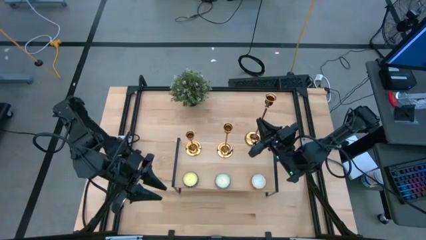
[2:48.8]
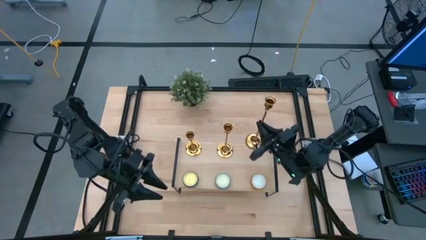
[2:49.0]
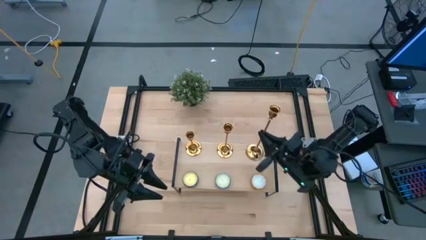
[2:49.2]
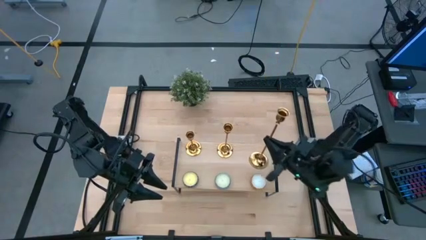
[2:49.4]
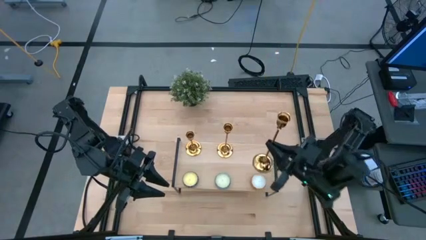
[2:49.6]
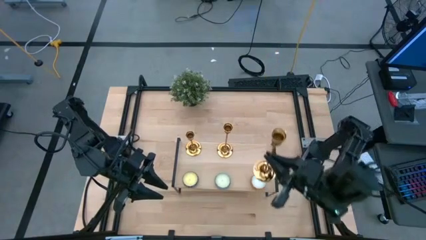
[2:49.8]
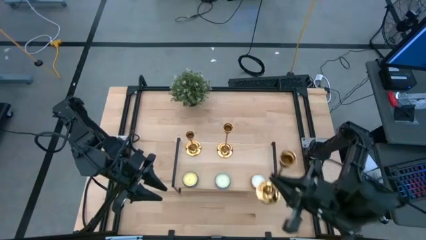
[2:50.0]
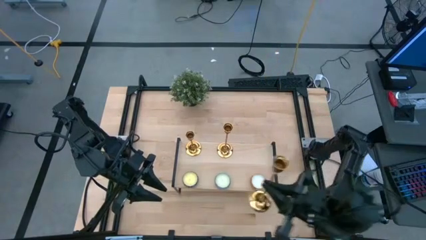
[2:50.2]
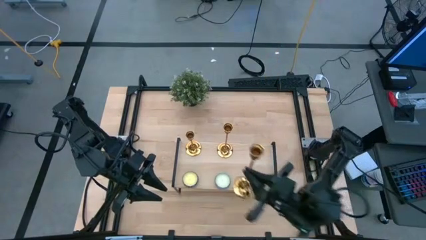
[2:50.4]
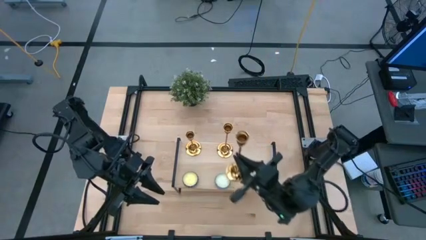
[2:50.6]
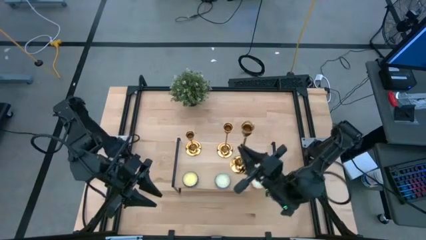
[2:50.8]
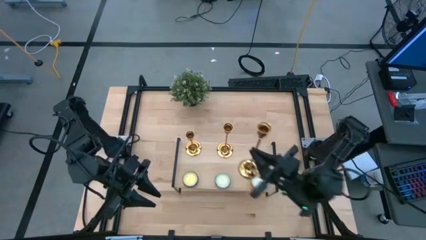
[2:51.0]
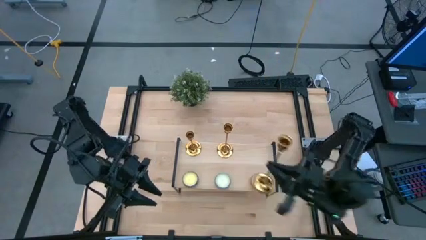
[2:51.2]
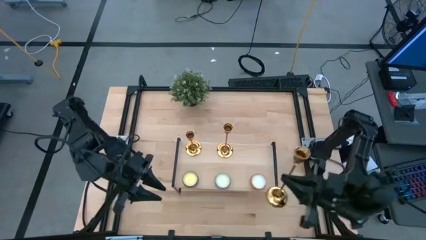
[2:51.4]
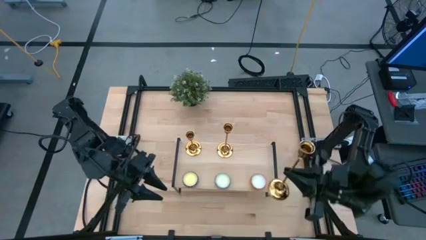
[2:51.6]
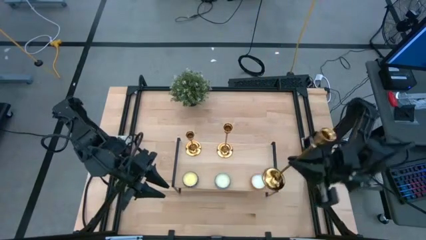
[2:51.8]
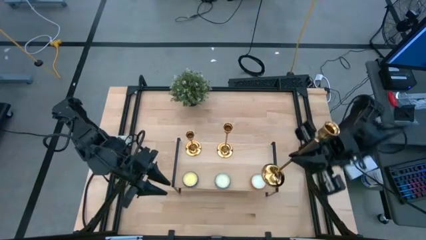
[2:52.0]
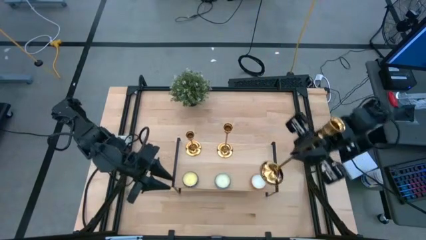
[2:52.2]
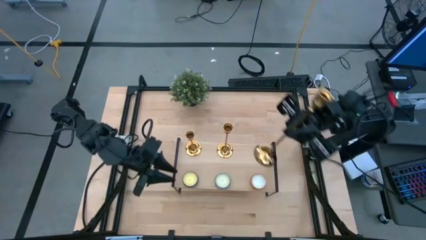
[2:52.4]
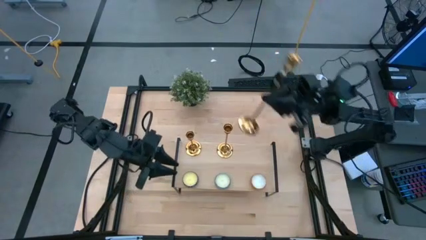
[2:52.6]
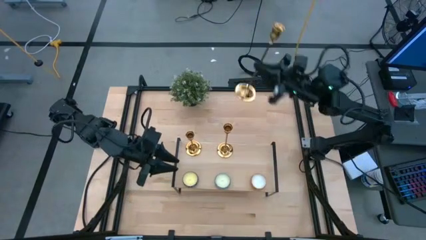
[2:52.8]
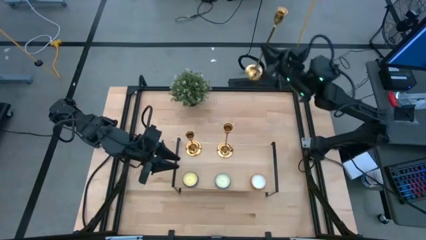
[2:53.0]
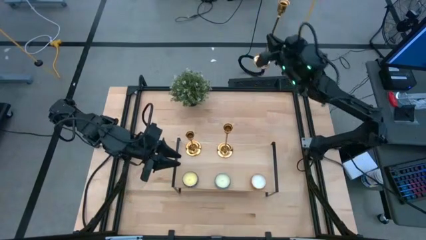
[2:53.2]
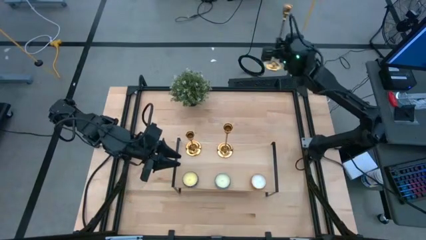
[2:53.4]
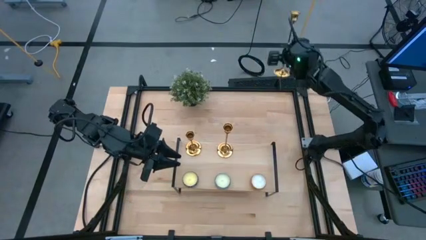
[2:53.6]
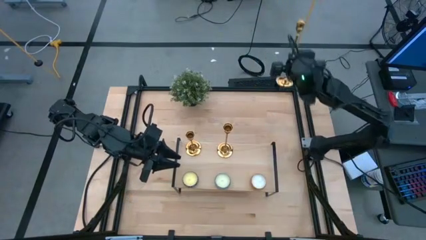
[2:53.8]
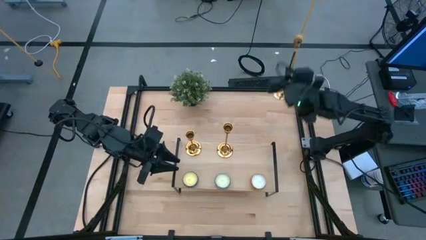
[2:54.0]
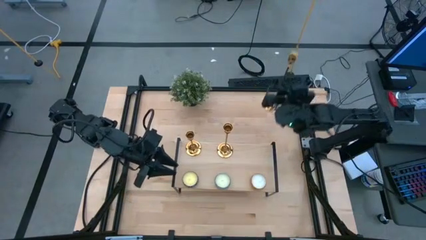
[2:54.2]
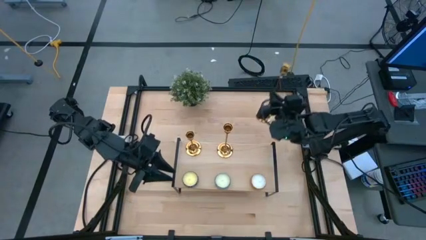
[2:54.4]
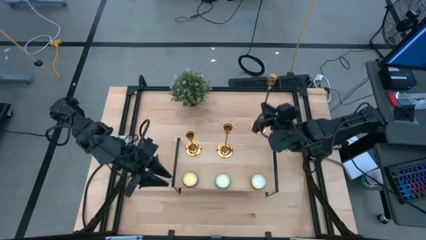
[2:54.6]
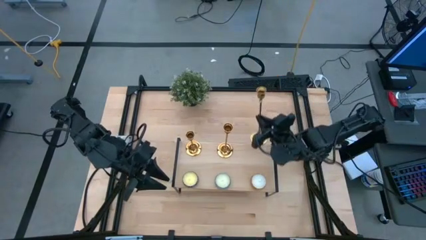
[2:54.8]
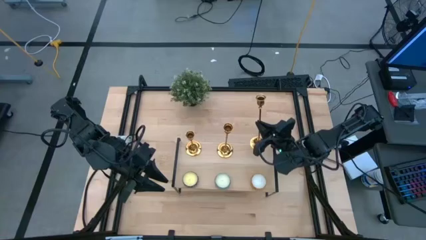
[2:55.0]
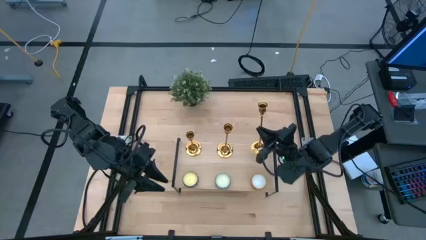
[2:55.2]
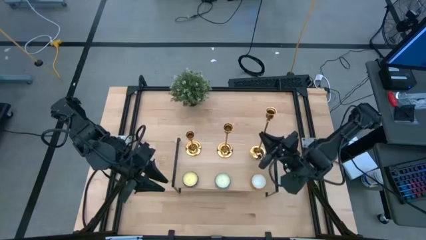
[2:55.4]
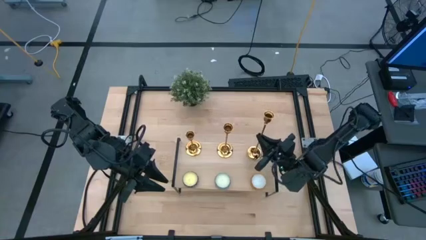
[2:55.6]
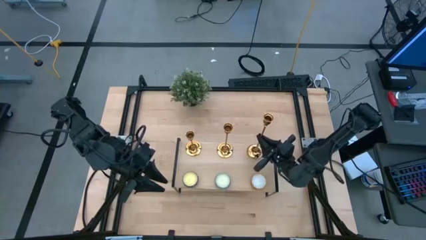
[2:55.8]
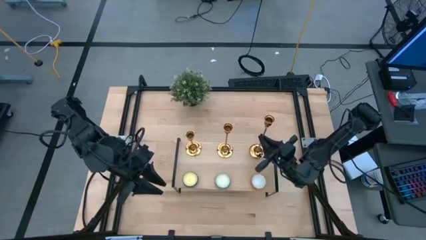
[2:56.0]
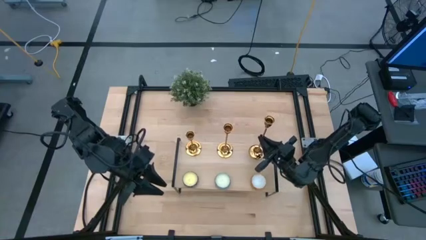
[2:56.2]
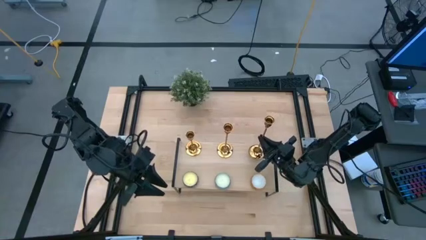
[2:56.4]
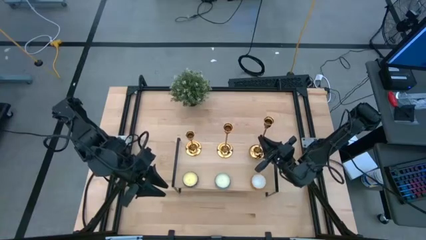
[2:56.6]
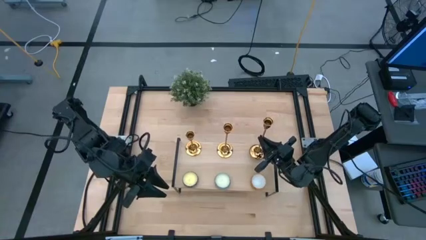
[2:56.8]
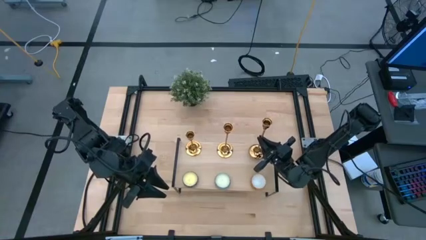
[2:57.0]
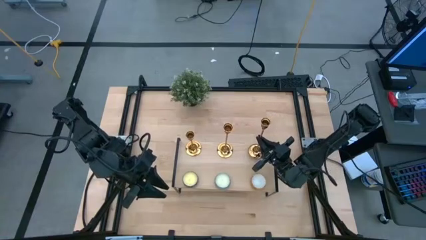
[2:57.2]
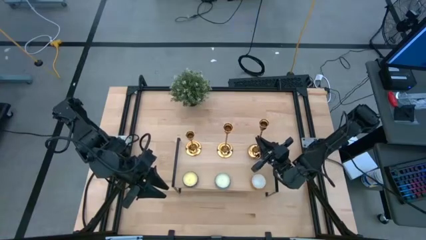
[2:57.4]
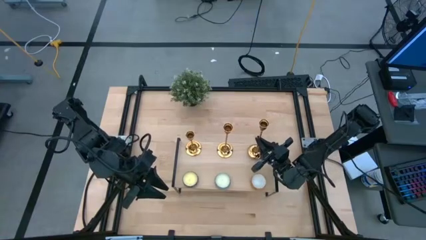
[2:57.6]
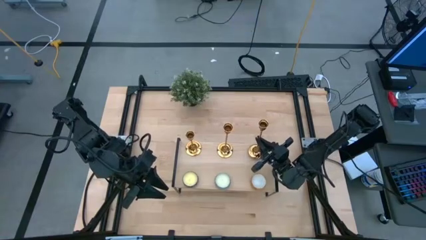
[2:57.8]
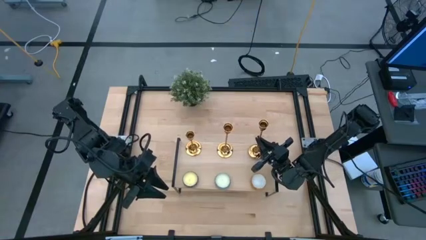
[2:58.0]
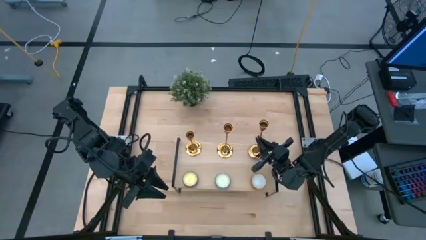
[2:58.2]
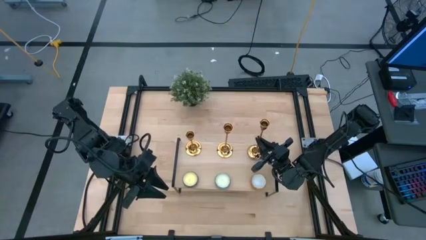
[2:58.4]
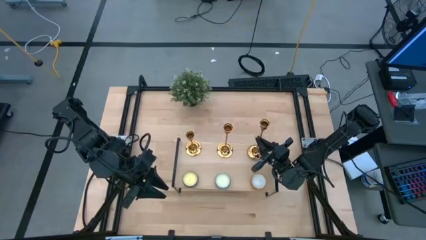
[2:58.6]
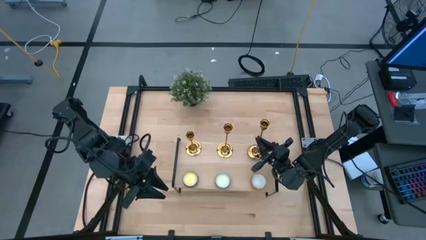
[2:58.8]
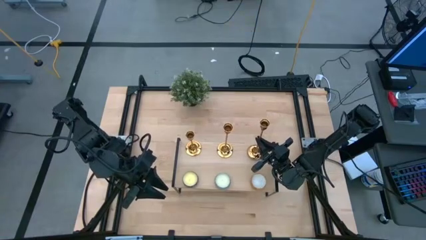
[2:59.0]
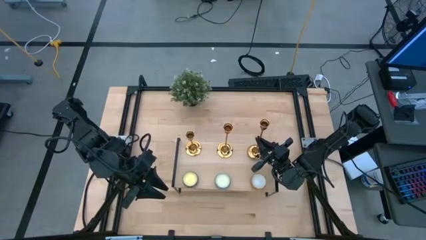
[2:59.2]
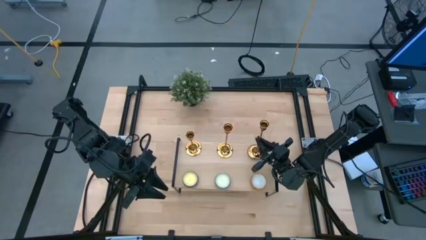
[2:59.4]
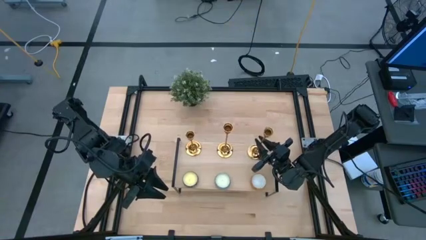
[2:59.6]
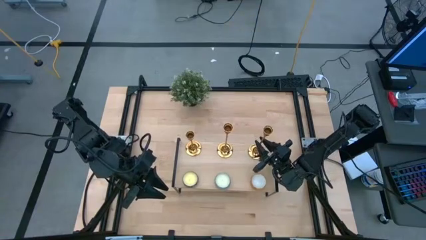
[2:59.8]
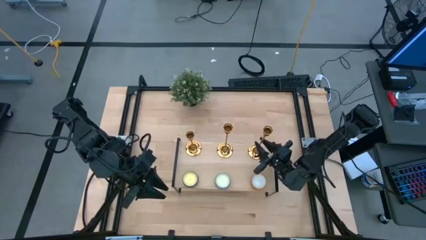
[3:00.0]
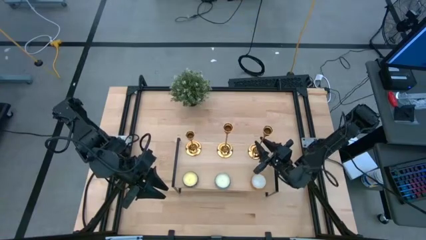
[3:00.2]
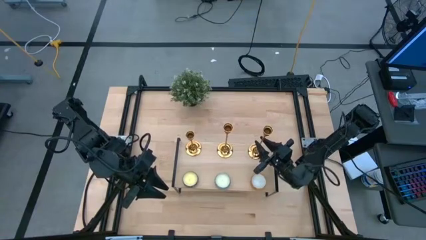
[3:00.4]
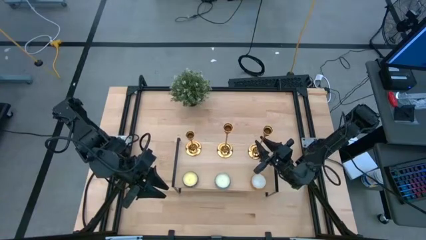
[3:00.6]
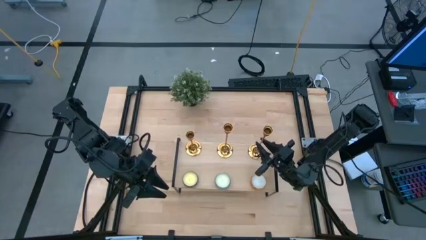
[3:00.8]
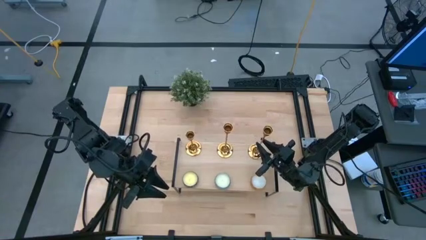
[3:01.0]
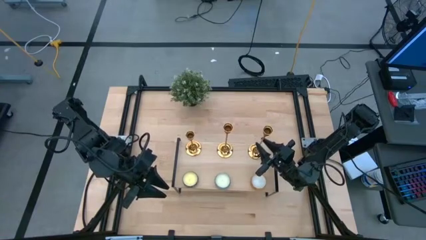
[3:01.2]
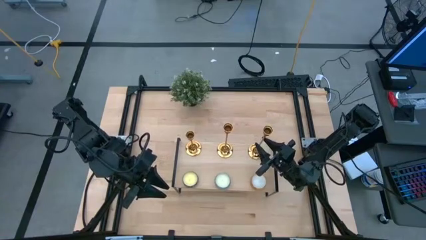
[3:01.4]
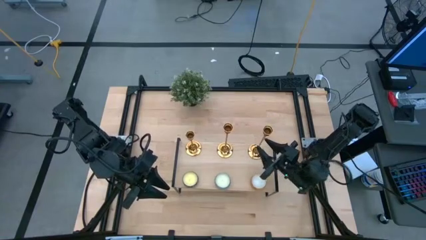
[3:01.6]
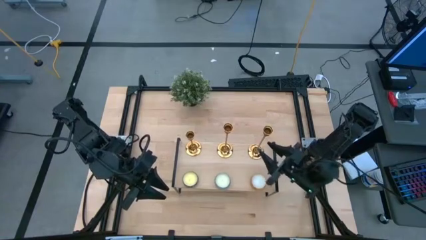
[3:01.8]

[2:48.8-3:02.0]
Task: Pick & Place candle stick holders
Put the candle holder on the shelf aligned with the other candle holder

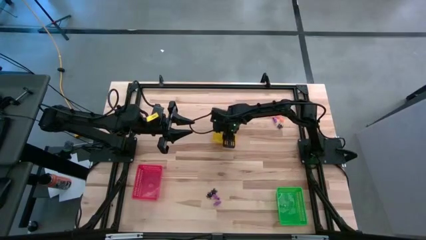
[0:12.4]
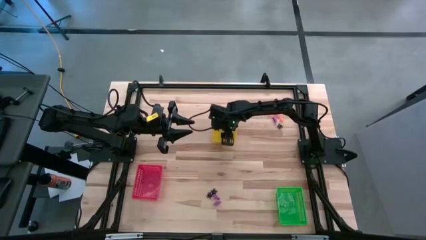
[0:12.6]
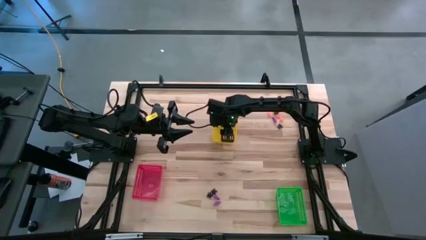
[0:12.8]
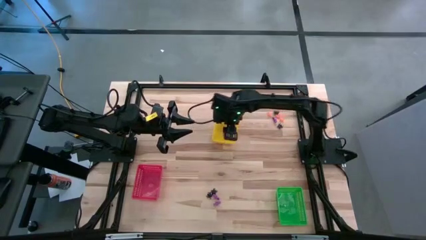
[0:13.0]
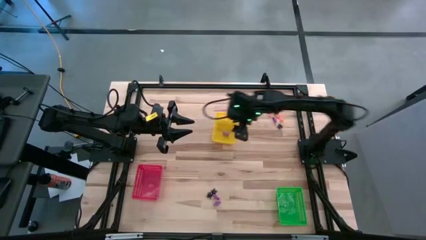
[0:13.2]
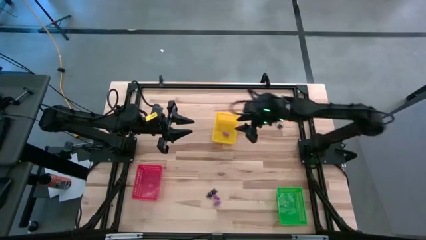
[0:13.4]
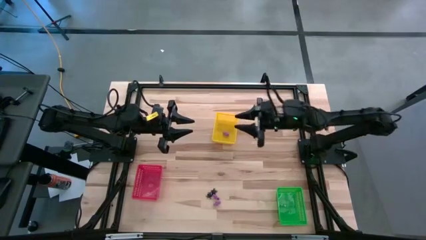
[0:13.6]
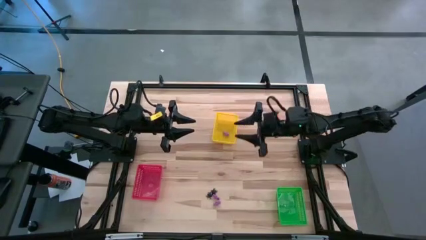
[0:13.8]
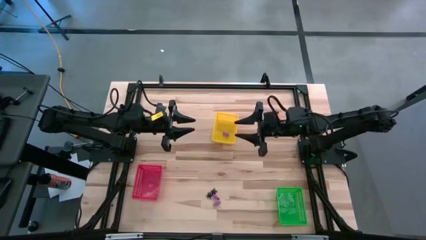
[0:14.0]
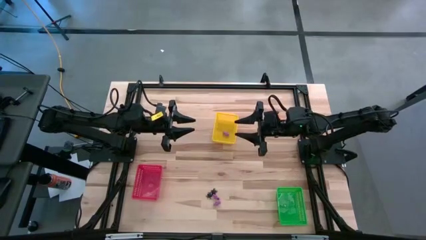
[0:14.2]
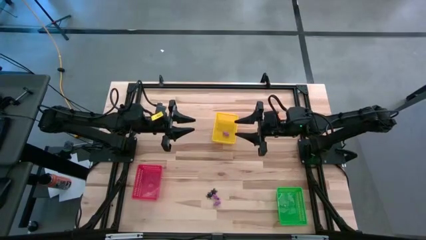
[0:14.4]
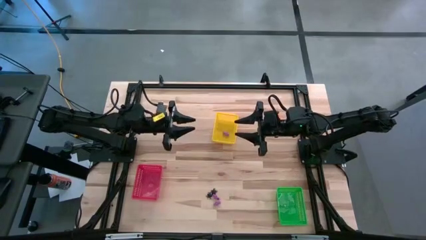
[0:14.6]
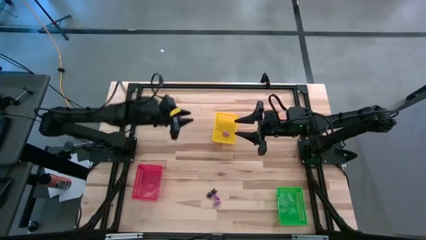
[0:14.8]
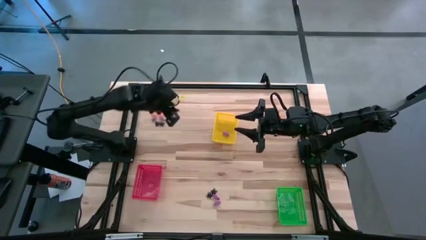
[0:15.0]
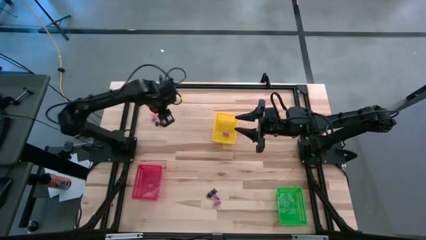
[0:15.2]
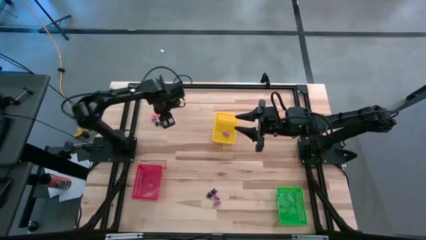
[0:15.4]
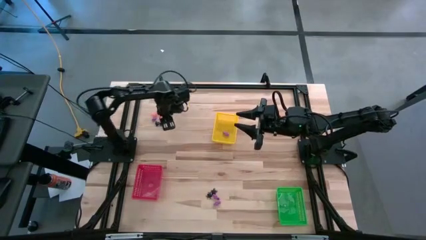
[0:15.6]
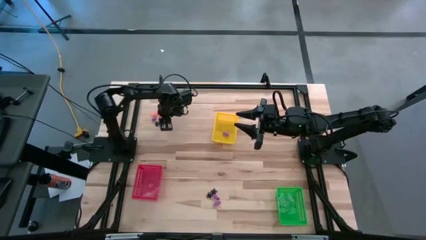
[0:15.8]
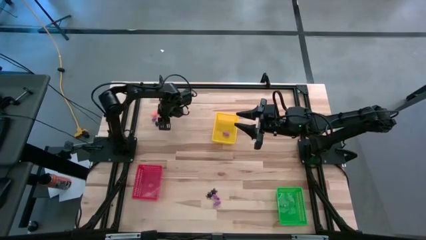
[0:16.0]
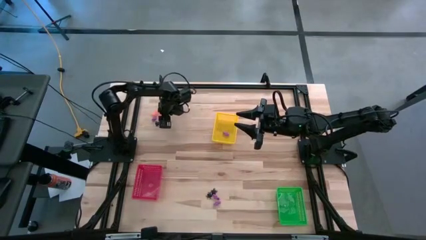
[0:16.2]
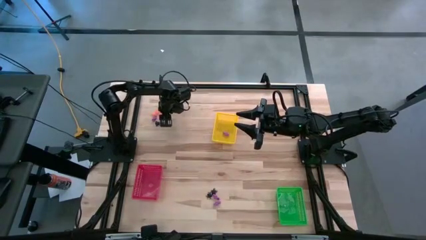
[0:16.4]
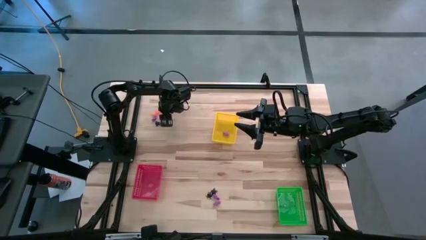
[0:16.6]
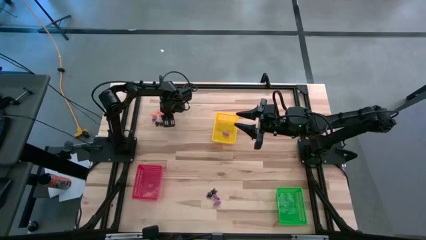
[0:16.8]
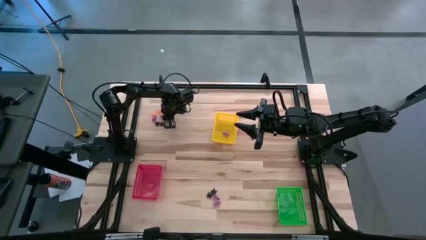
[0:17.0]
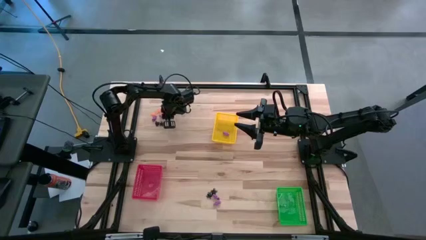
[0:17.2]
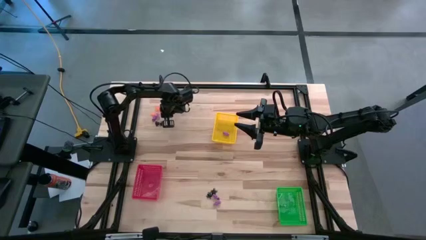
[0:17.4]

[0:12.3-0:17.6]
Task: Sort Halloween decoration
Put the skeleton toy into the yellow bin
